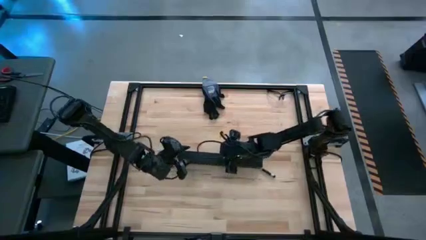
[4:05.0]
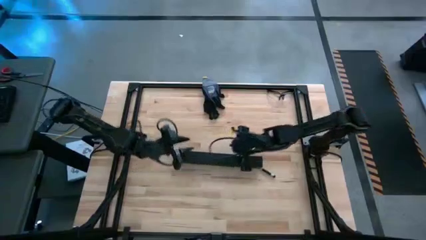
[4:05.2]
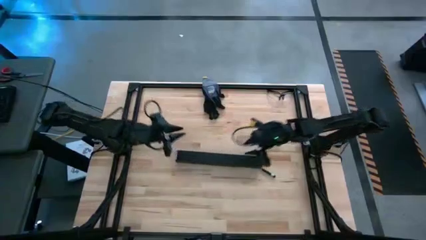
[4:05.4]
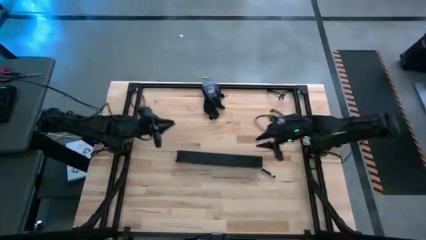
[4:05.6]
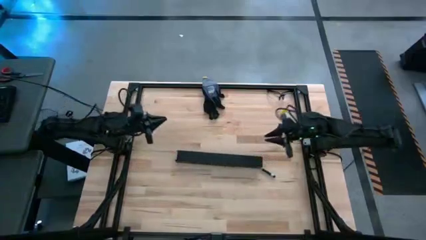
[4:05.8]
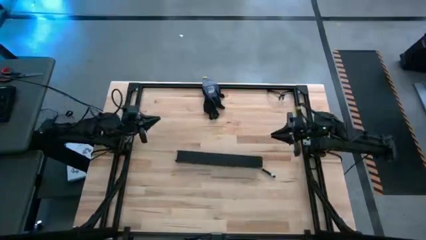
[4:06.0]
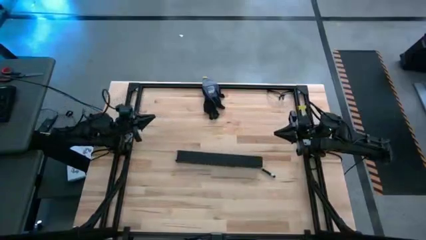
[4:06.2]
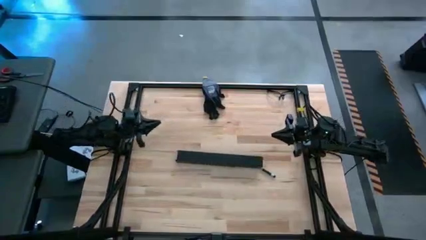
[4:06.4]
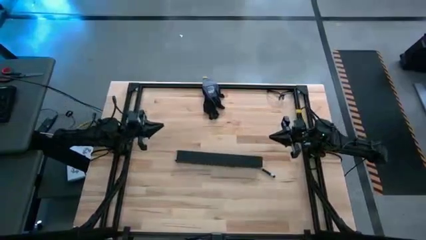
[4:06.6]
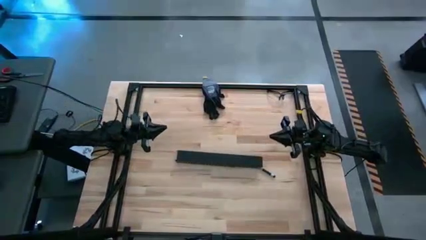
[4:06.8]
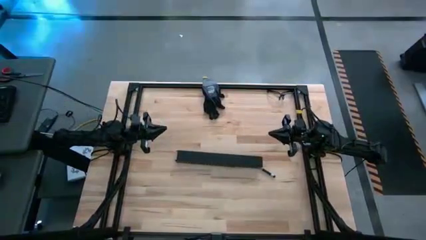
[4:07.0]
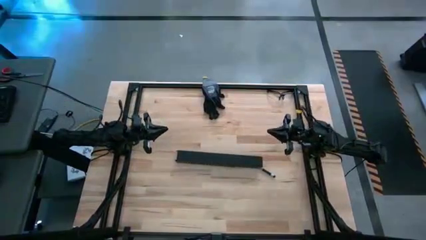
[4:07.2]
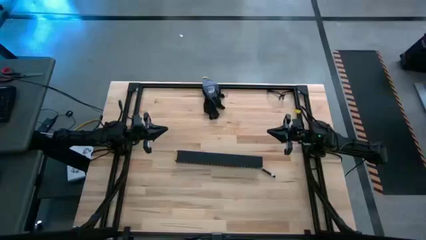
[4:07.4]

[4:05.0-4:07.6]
Task: Ziptie cables
Return to Home Position

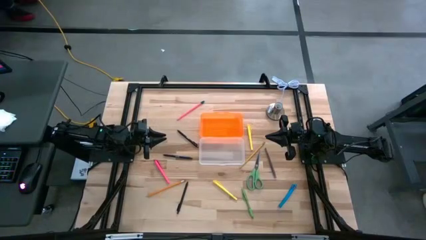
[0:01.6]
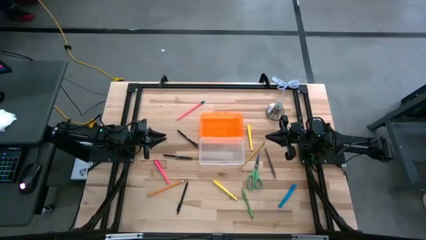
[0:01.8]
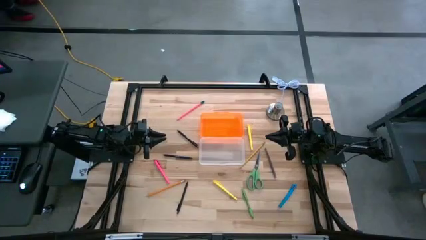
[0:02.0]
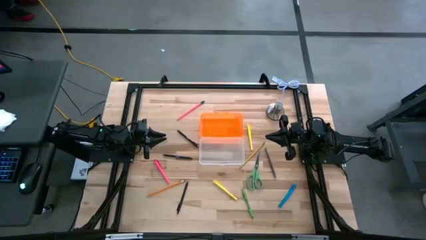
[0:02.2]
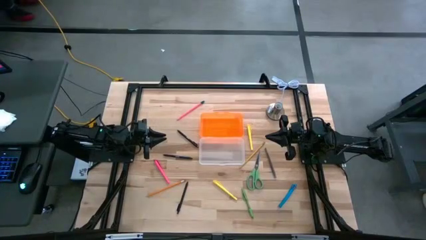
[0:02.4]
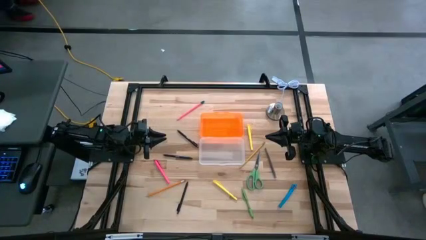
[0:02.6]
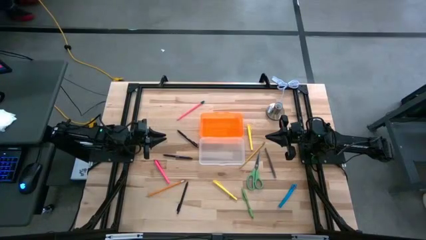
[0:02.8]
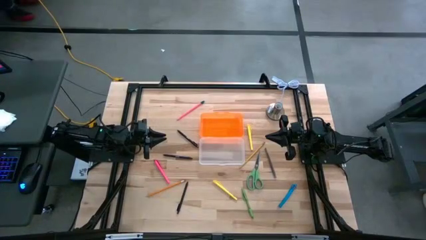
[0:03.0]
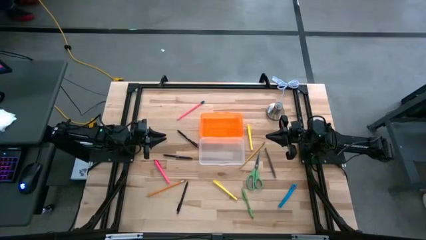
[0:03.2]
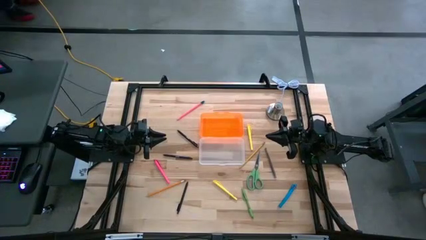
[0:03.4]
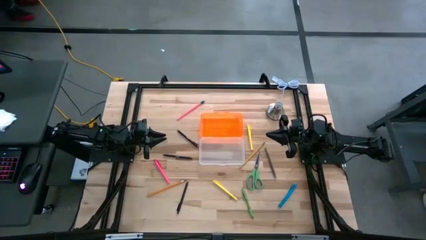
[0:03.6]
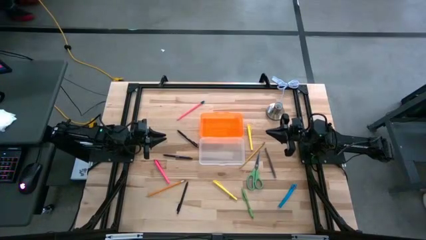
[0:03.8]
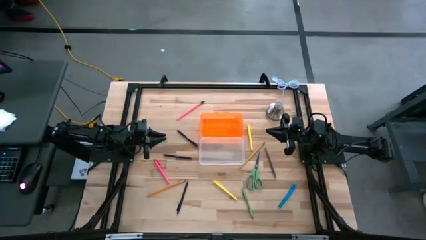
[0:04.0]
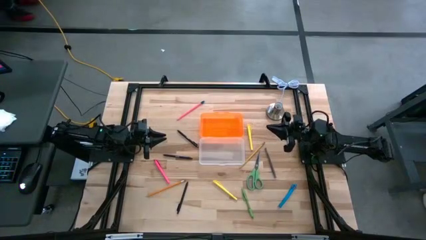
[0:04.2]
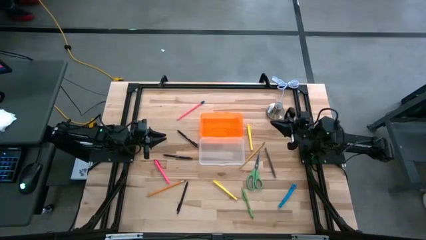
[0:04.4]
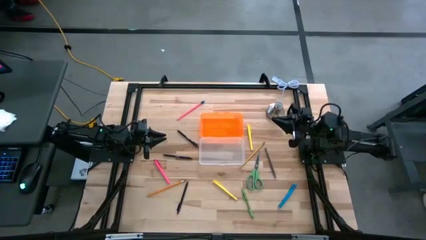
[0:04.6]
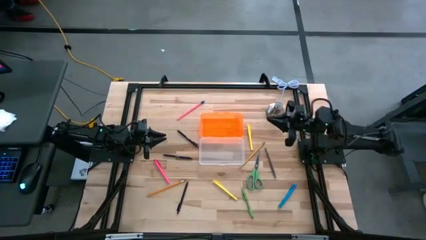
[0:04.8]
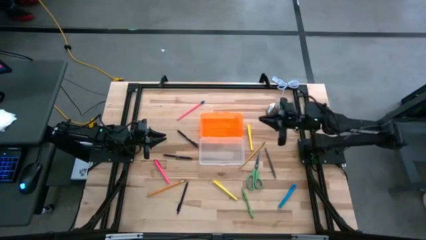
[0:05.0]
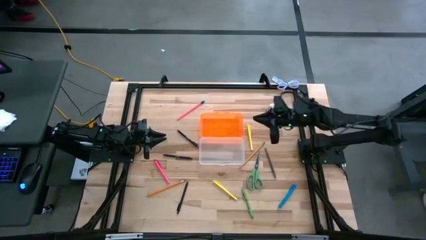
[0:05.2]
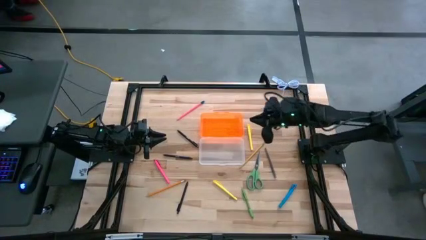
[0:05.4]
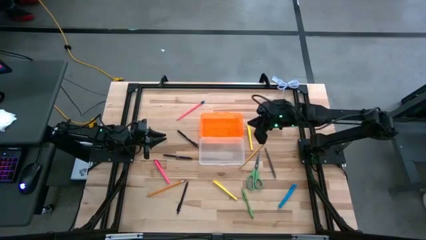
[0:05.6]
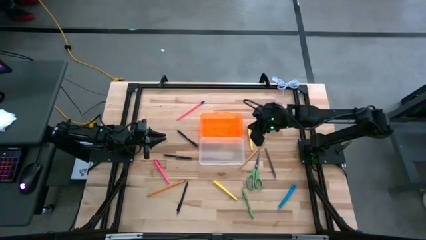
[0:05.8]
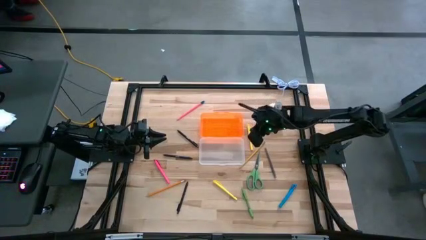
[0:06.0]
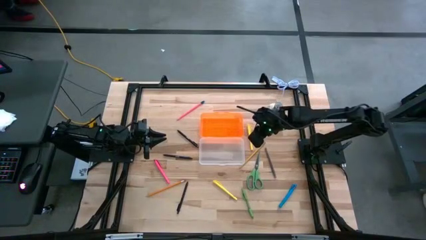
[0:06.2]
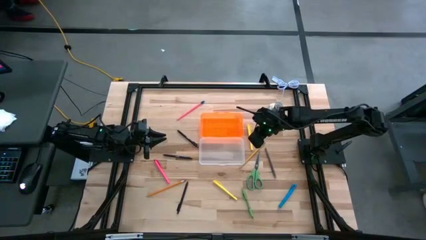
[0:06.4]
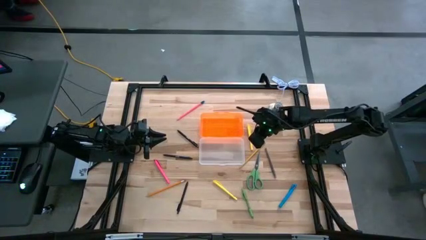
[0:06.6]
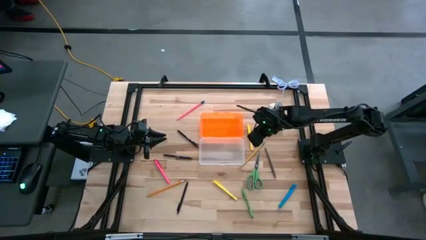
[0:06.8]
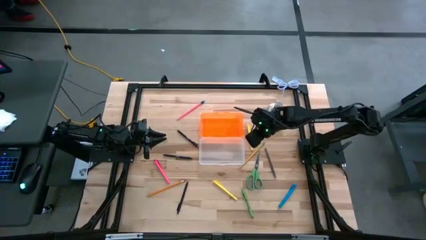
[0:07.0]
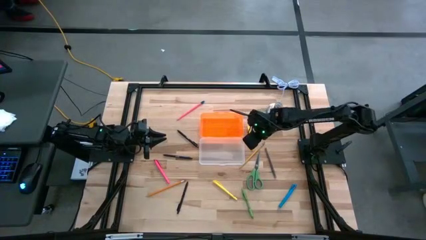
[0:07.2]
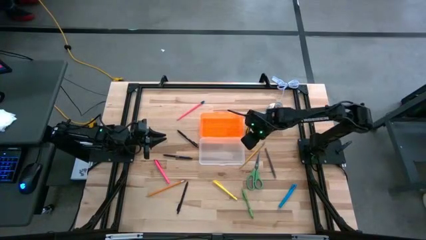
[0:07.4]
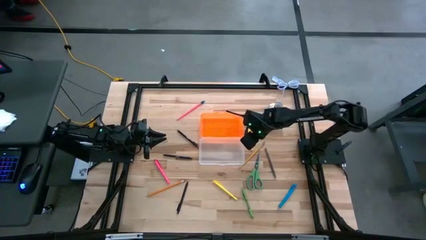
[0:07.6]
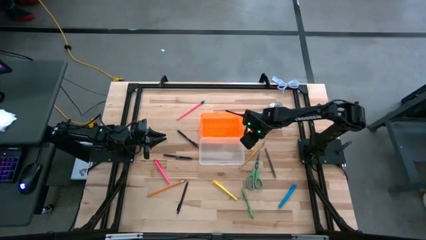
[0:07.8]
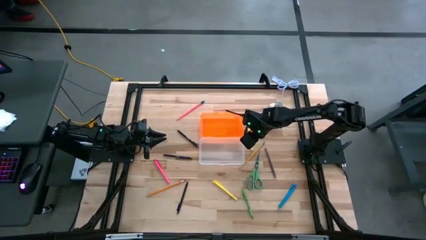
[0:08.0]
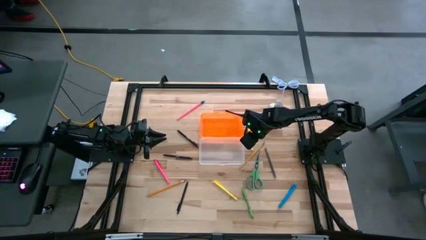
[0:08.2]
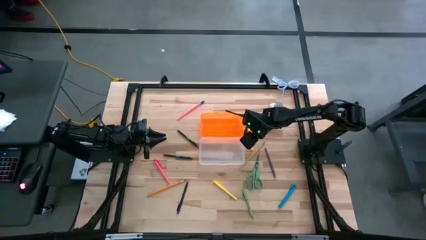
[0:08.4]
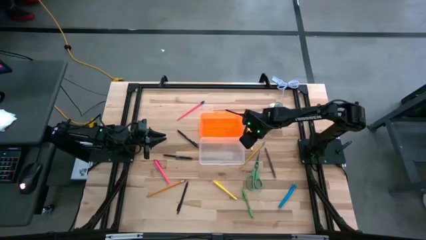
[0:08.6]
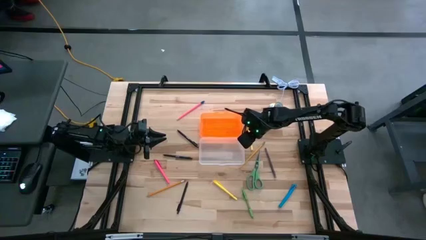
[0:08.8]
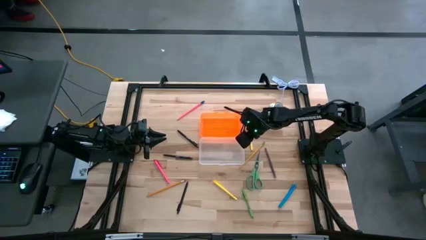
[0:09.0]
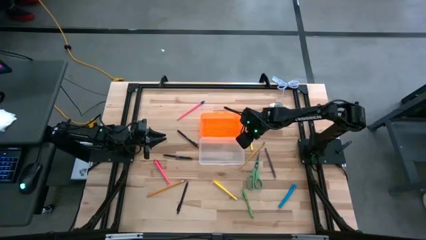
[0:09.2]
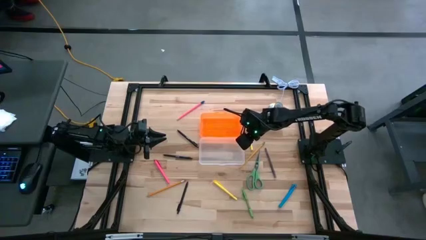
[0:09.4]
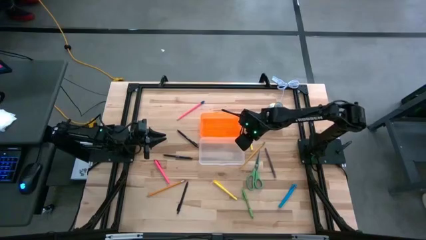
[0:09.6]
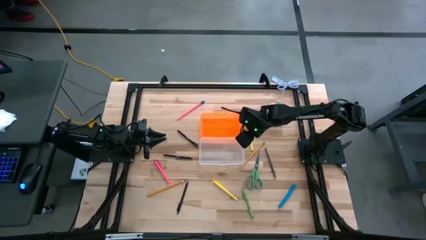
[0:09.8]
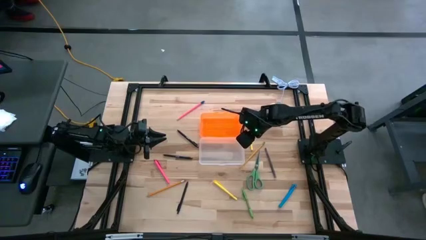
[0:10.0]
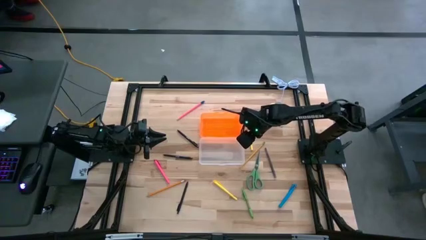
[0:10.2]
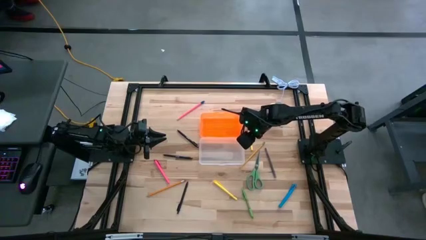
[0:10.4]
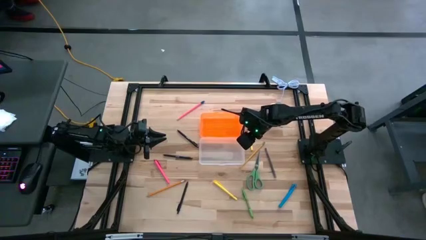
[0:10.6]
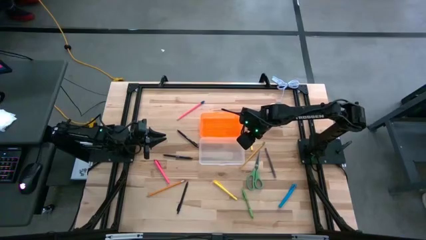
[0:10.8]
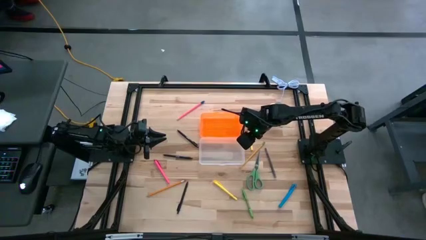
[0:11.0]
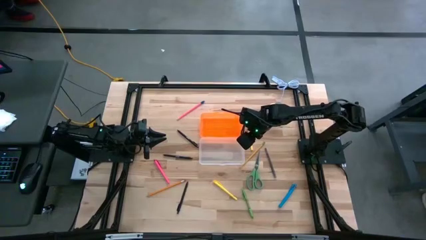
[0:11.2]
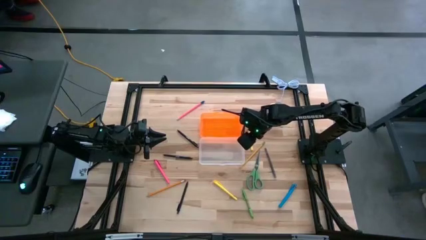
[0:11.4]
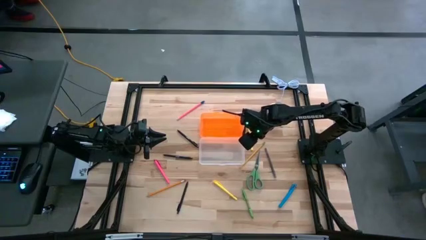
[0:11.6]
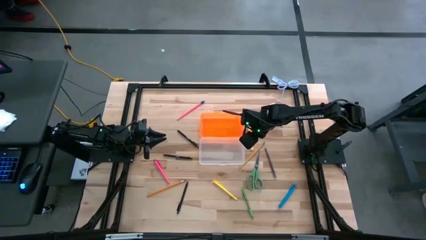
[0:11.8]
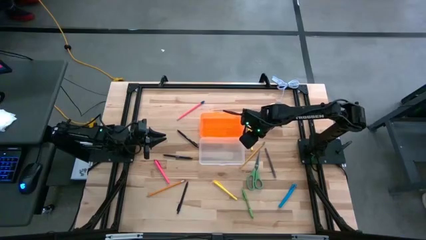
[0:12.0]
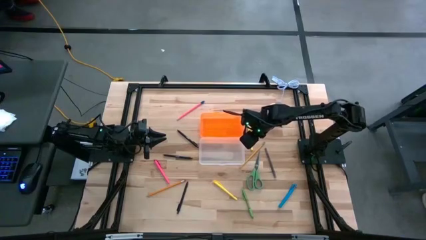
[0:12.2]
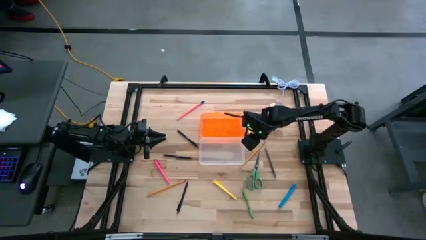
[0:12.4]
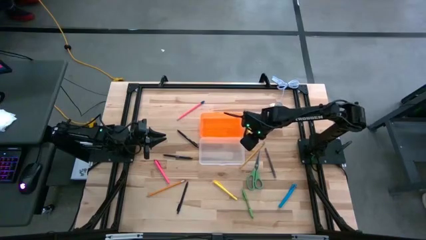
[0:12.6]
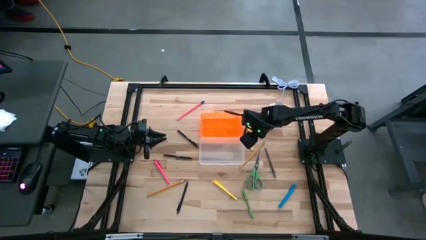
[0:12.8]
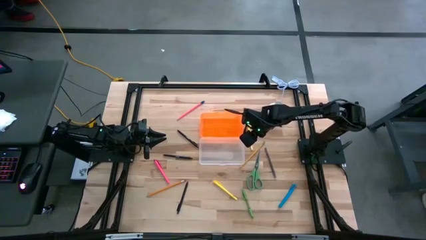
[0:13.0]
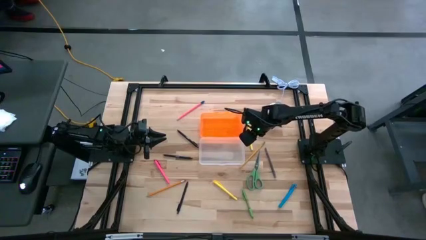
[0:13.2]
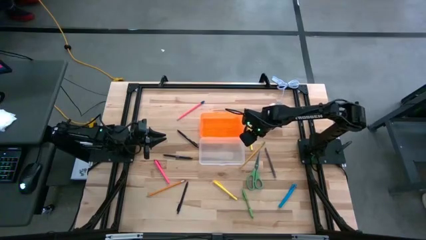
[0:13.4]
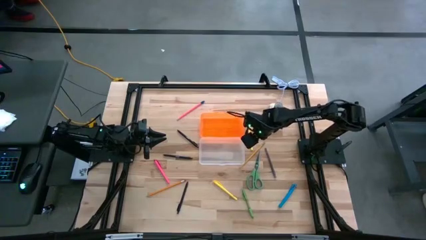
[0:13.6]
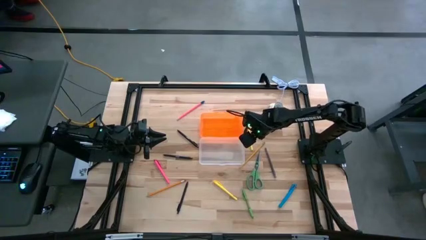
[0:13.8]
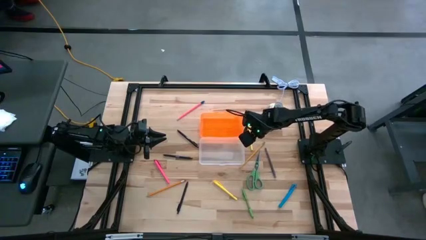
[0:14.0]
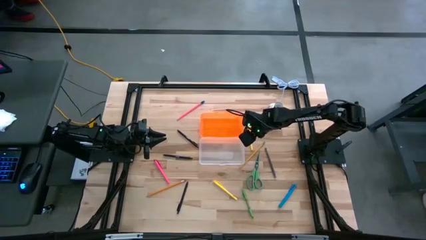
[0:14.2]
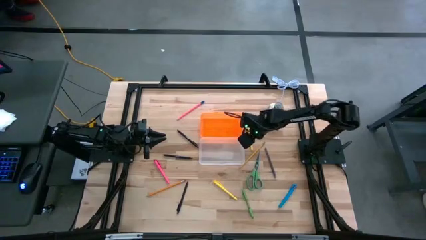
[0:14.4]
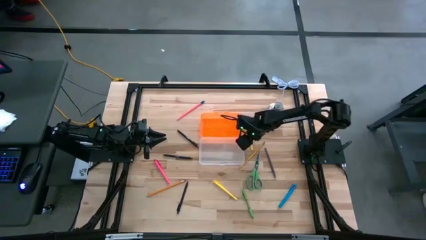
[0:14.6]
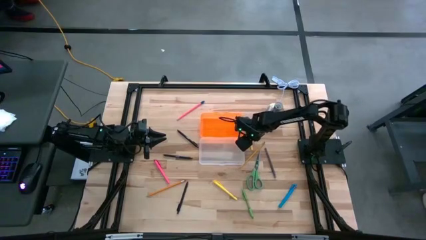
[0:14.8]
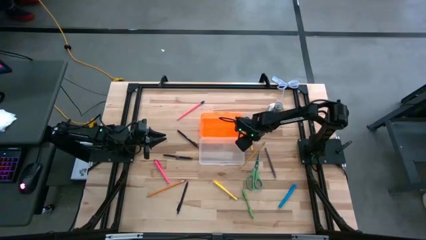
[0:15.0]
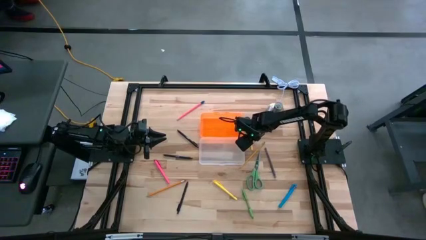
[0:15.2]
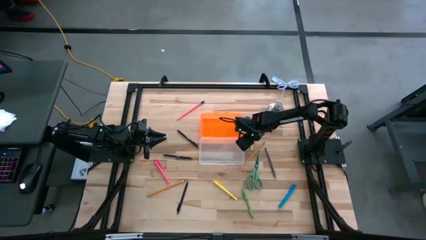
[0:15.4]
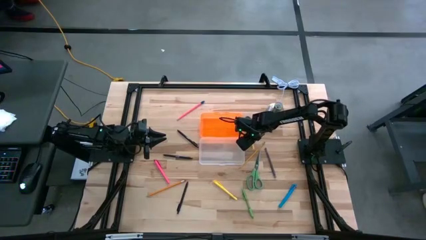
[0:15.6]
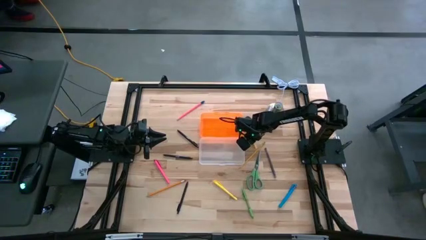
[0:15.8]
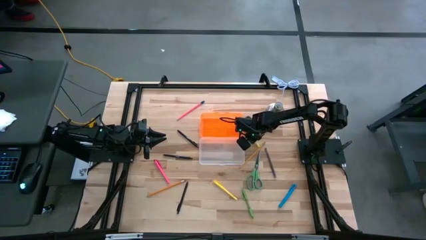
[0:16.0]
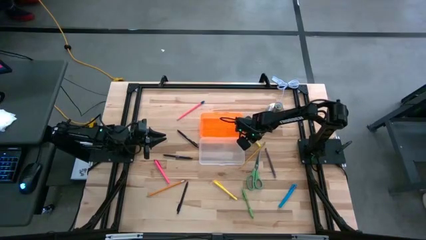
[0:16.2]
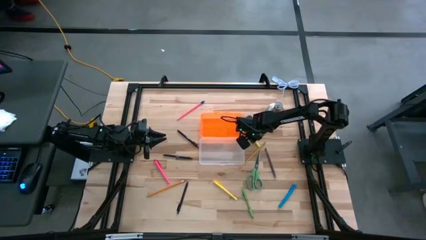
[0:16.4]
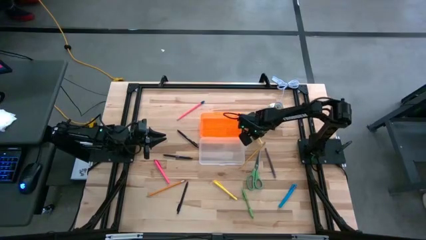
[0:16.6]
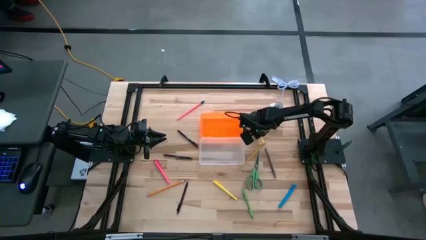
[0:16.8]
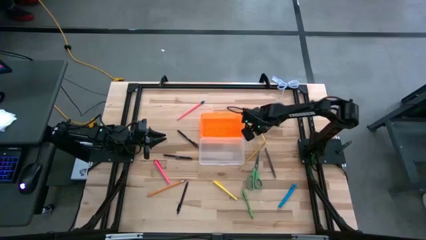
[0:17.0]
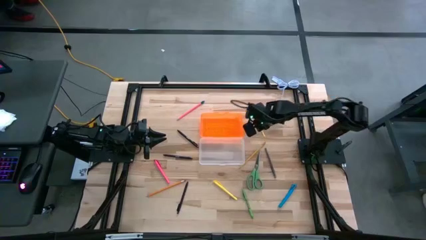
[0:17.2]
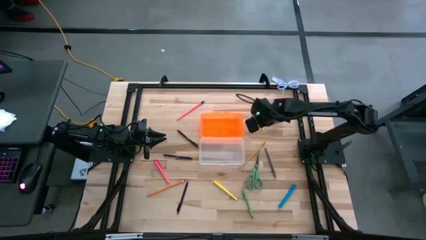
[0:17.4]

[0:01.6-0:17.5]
Task: Pick & place school supplies into a supply box
Put the yellow pen into the container
